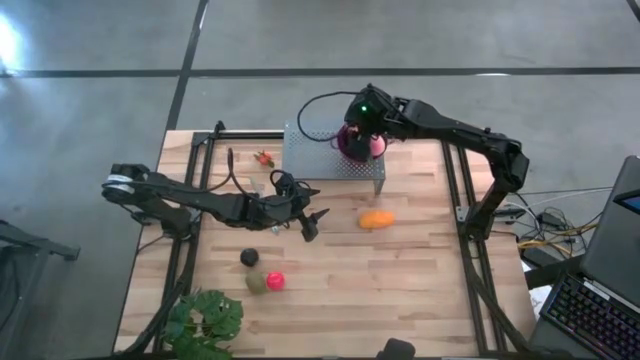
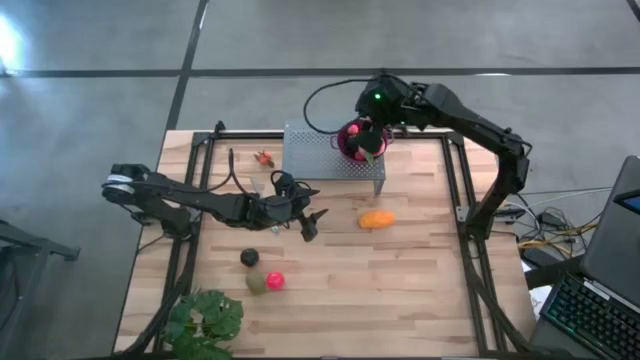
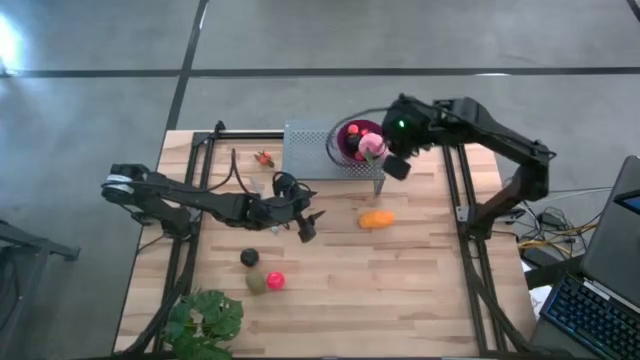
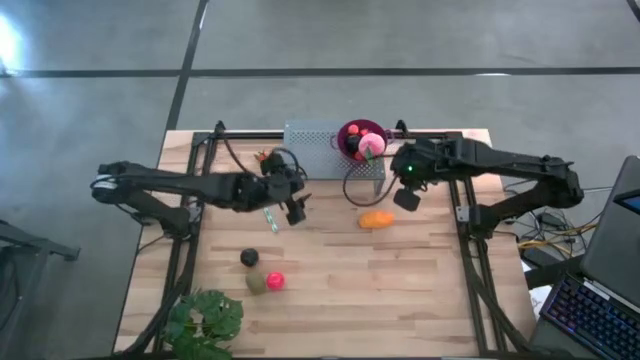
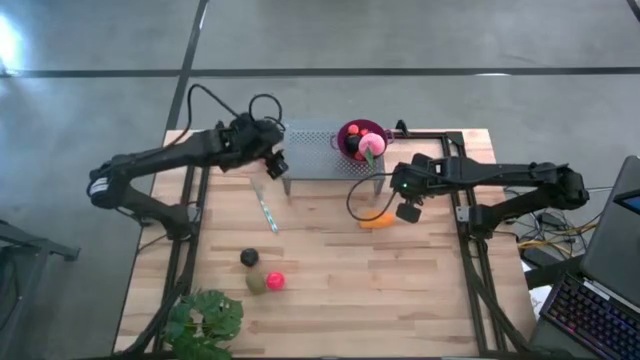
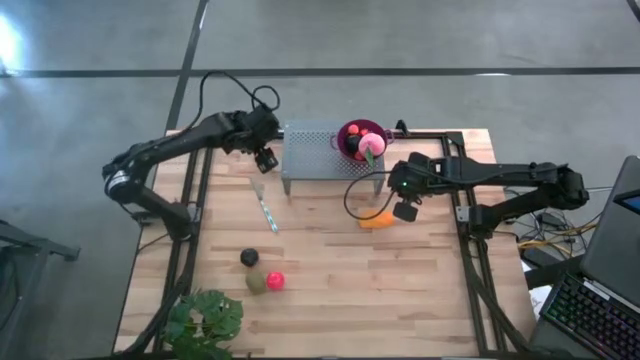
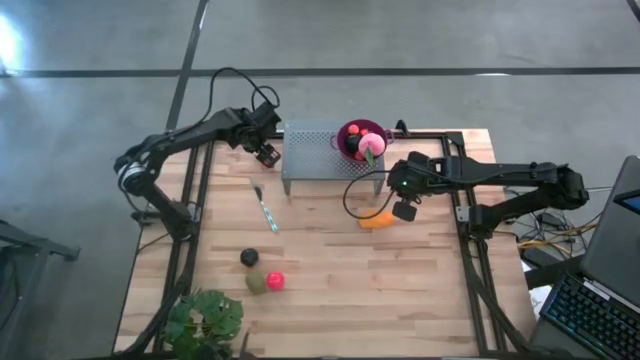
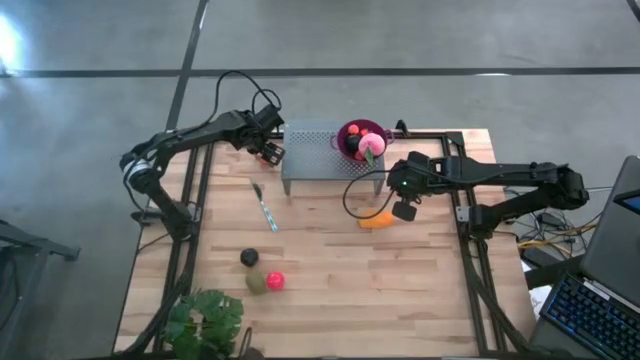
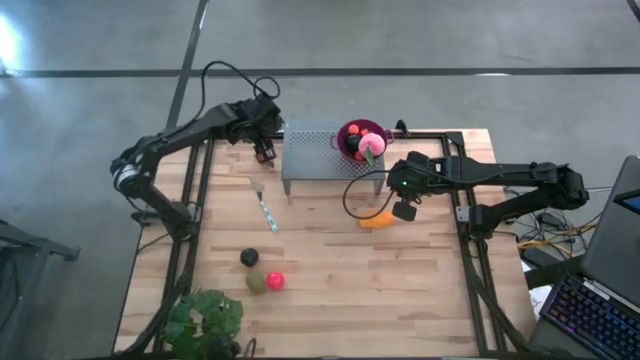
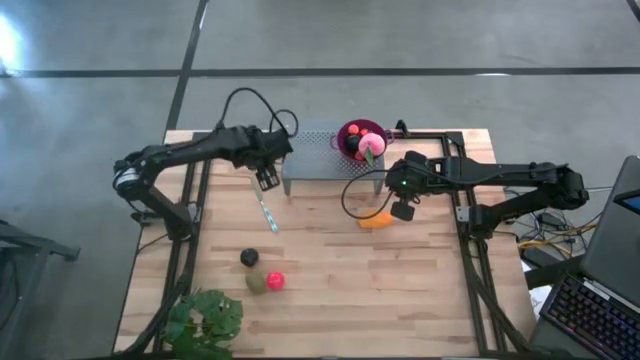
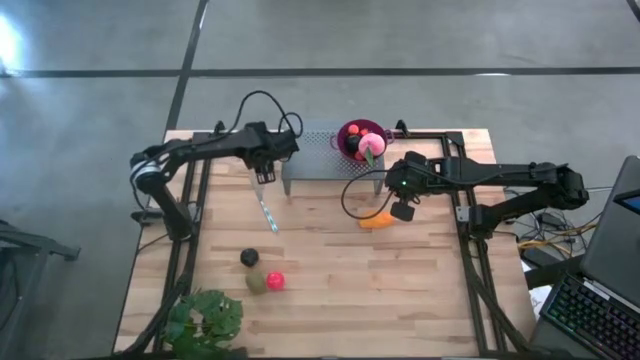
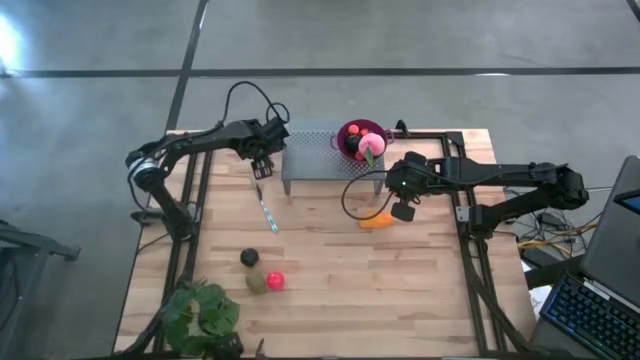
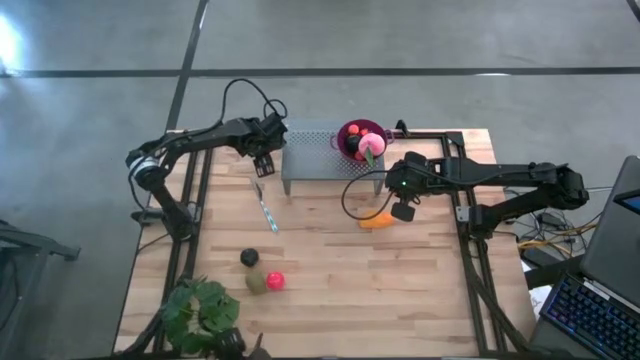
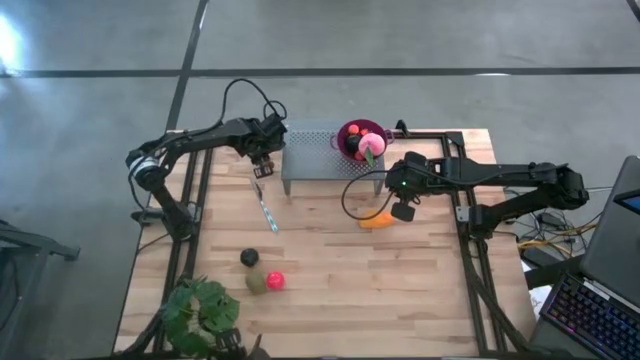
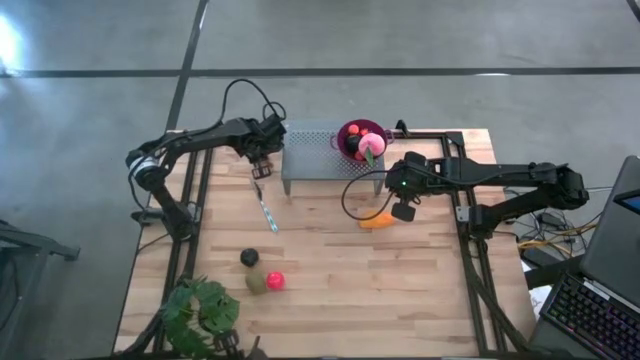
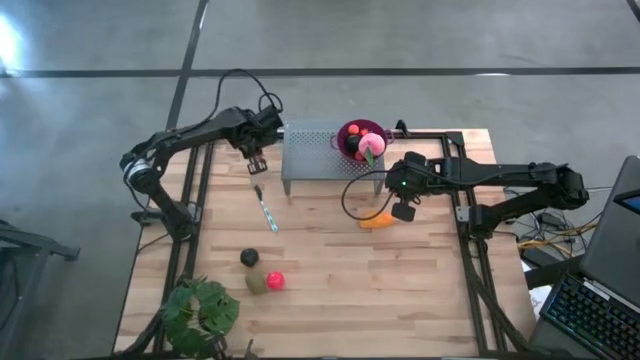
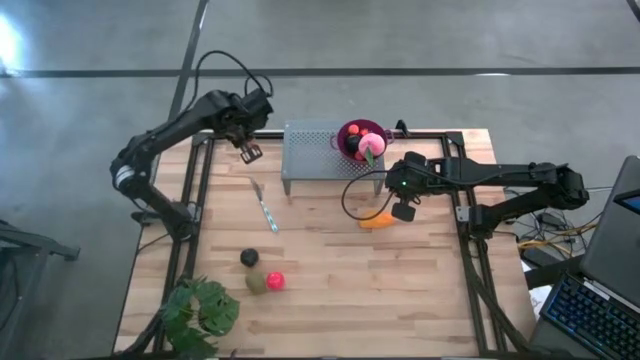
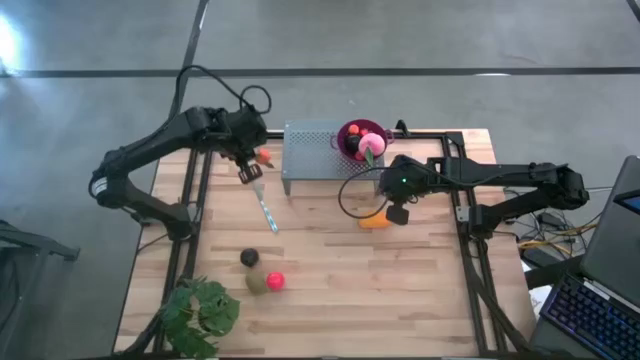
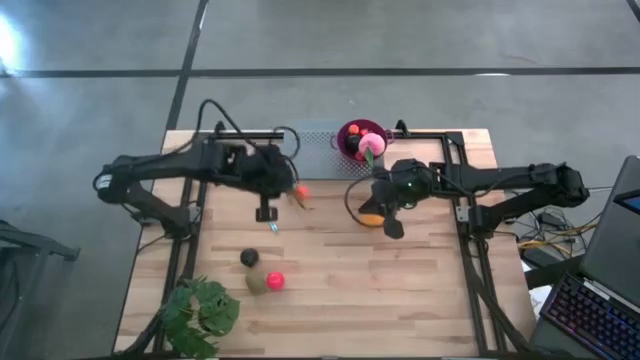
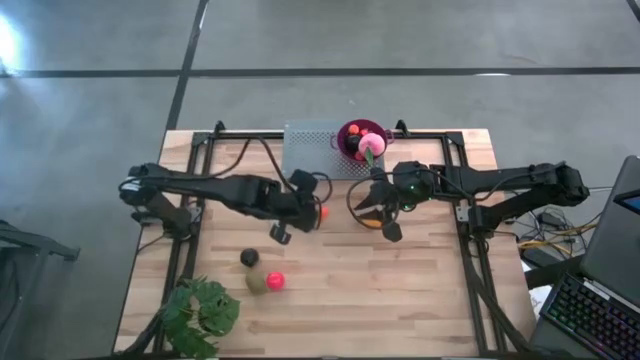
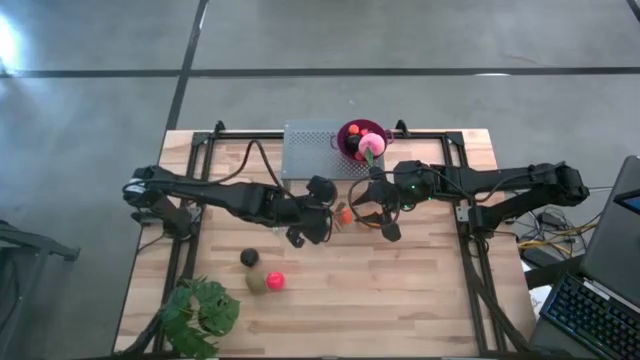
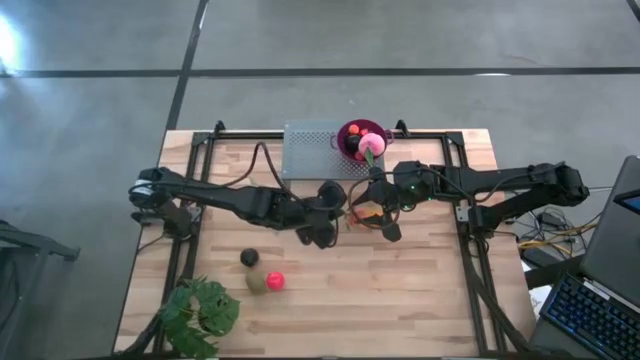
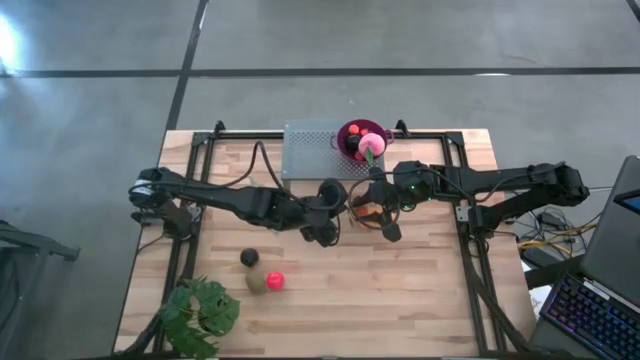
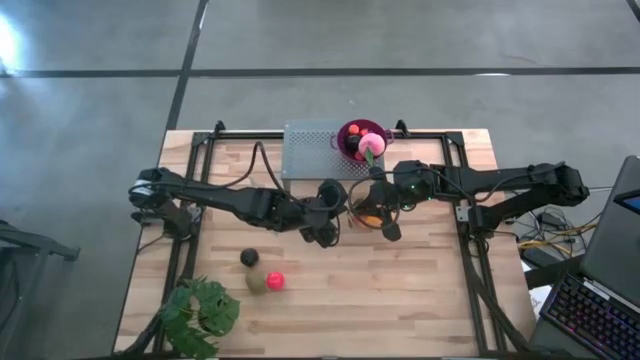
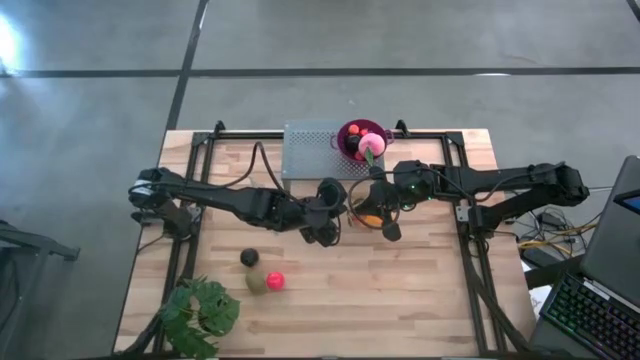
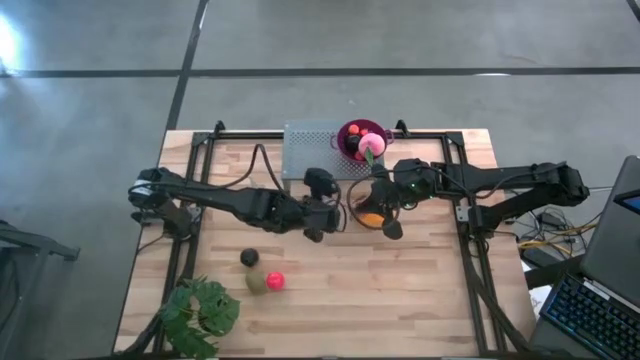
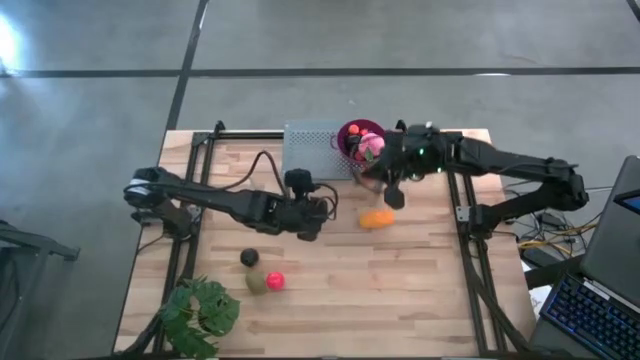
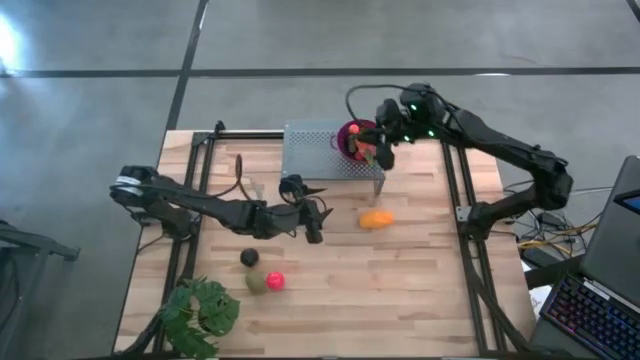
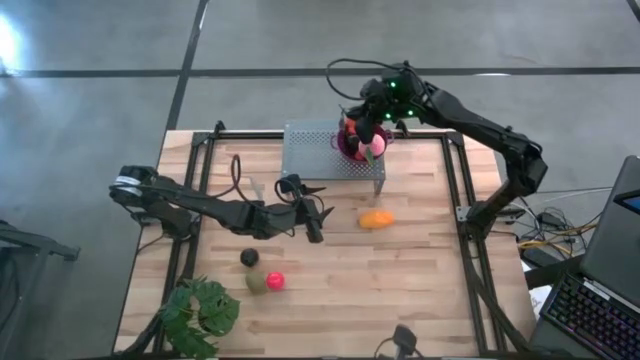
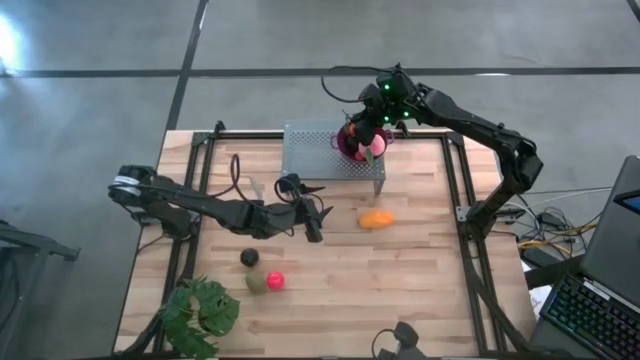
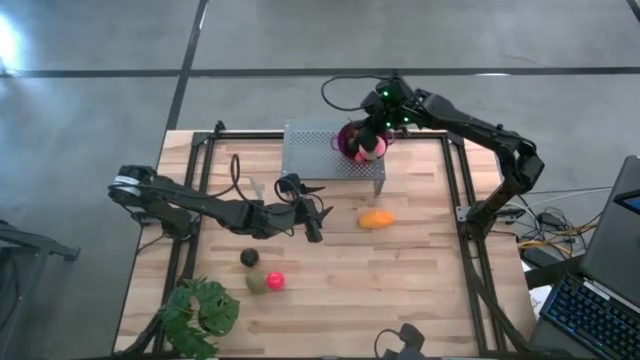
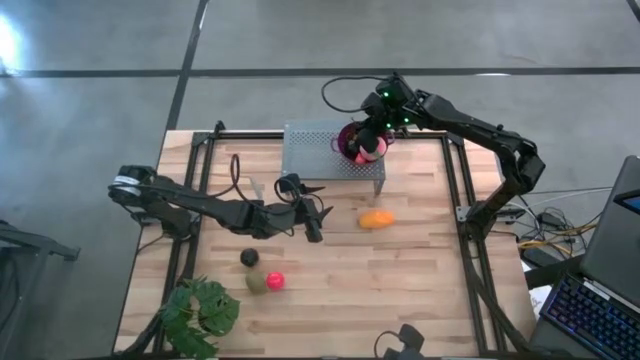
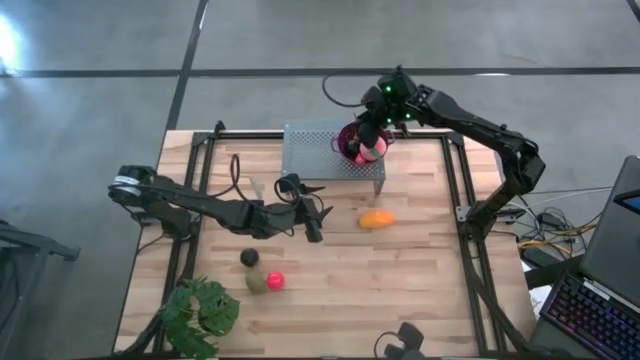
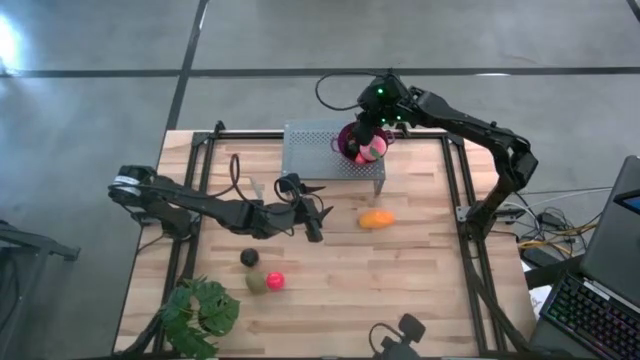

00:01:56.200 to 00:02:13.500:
Task: Pick & Place Fruit
Put the tangerine into the purple bowl on the shelf

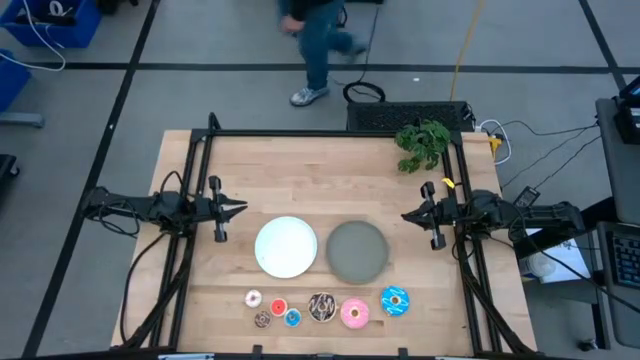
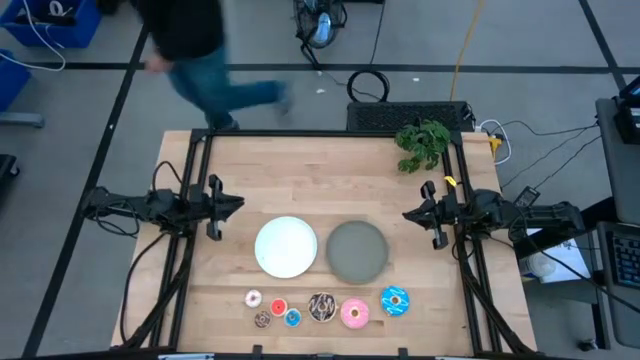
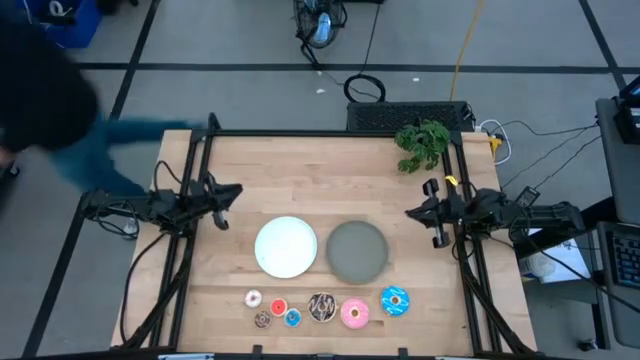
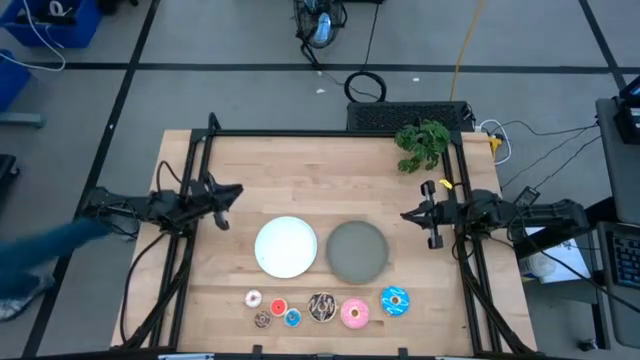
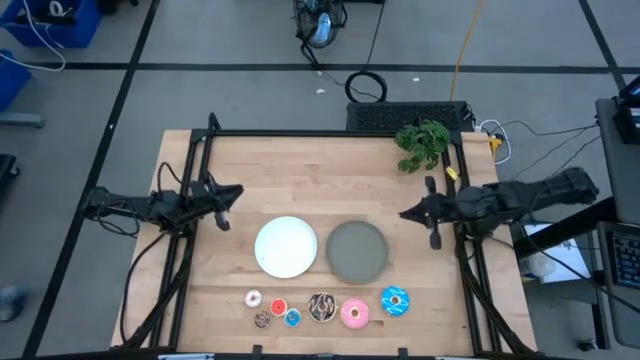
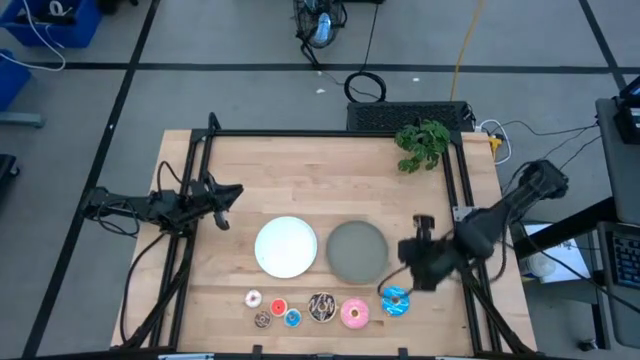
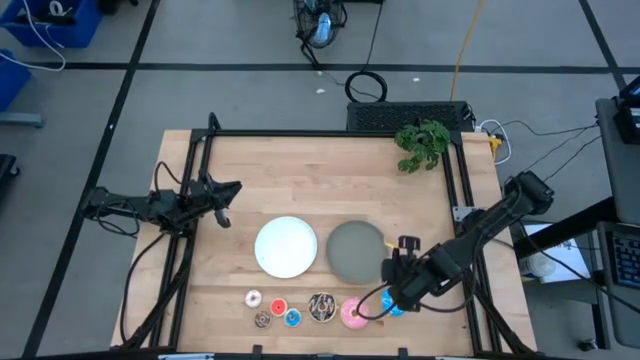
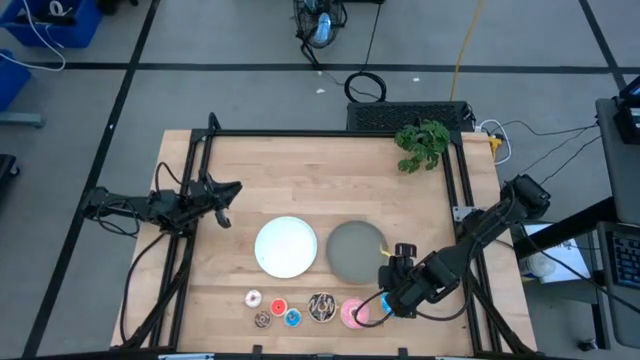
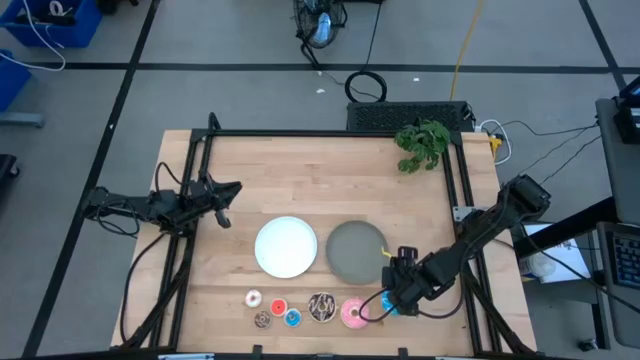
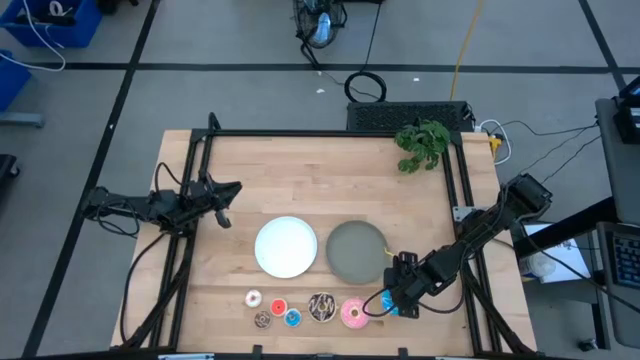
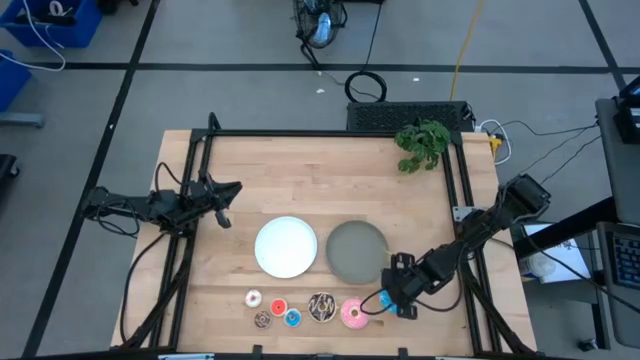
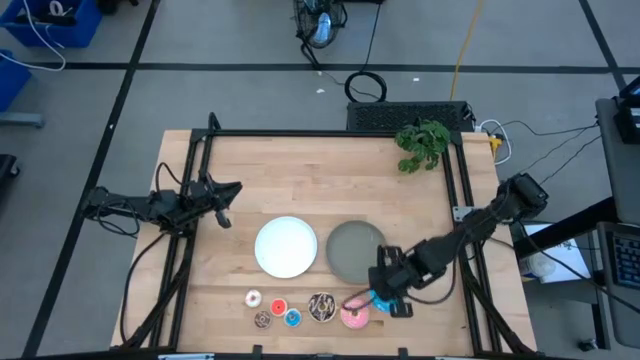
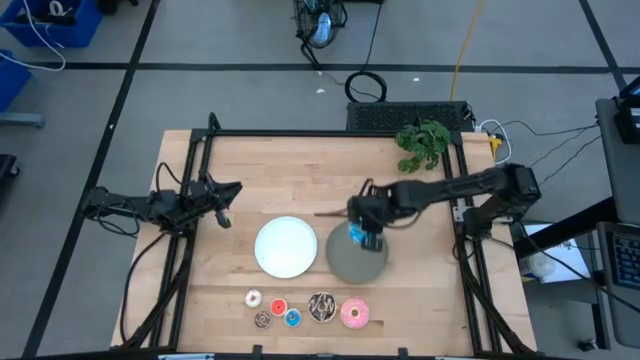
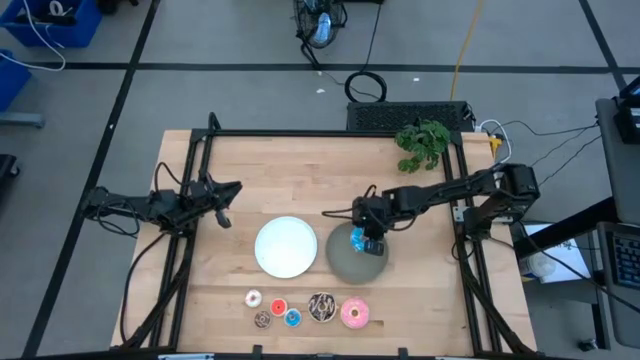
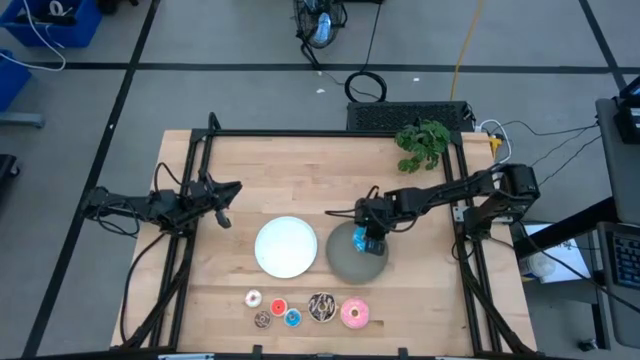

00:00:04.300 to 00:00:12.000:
Task: Pick & Place donuts
Put the large blue donut on the gray plate
